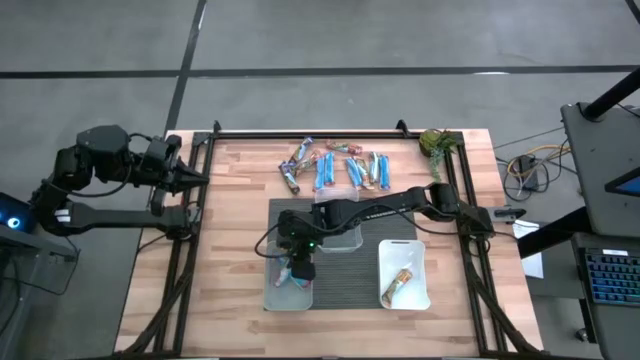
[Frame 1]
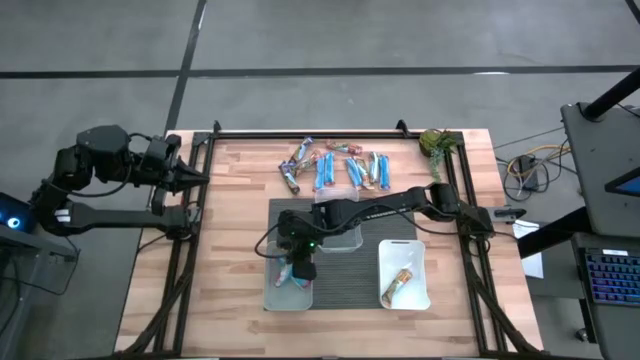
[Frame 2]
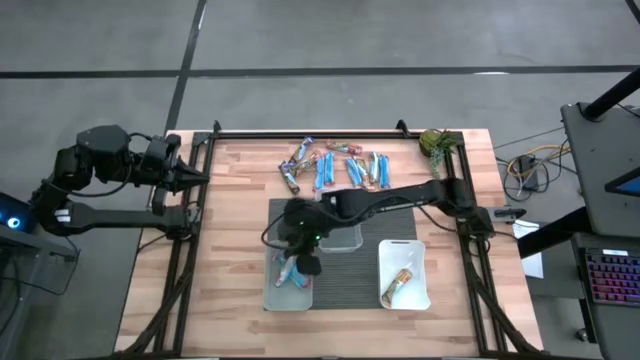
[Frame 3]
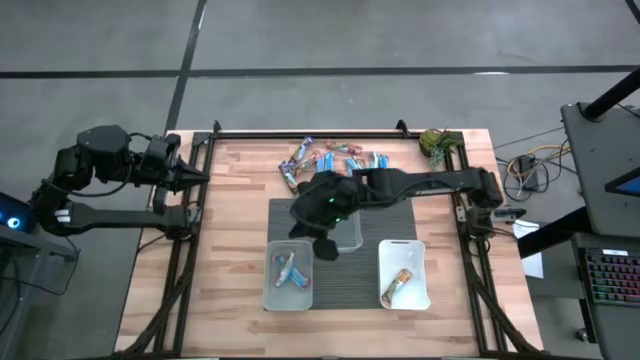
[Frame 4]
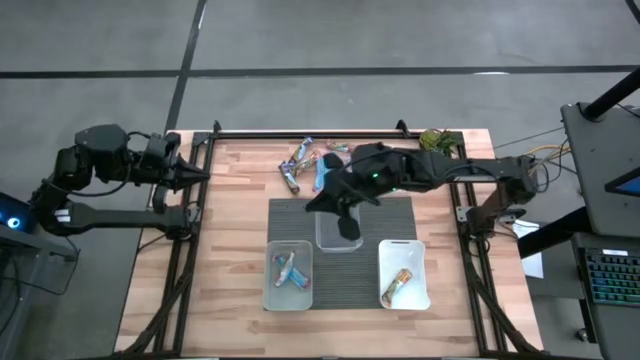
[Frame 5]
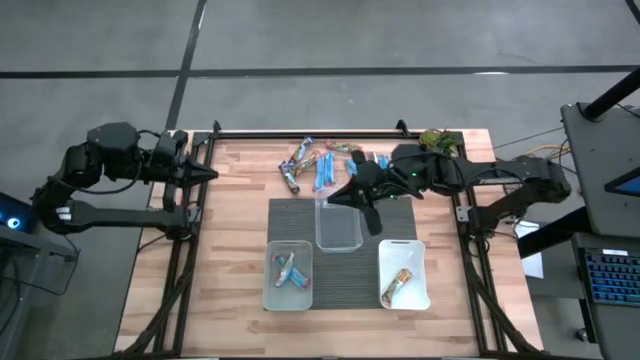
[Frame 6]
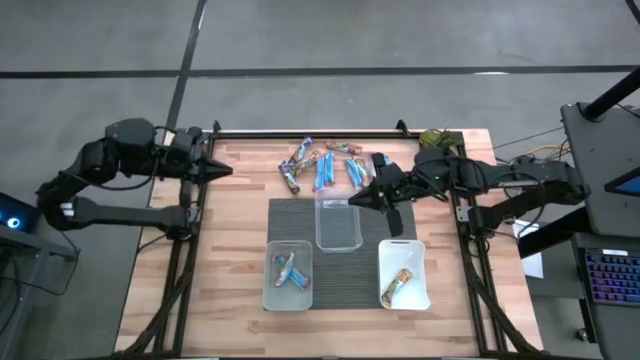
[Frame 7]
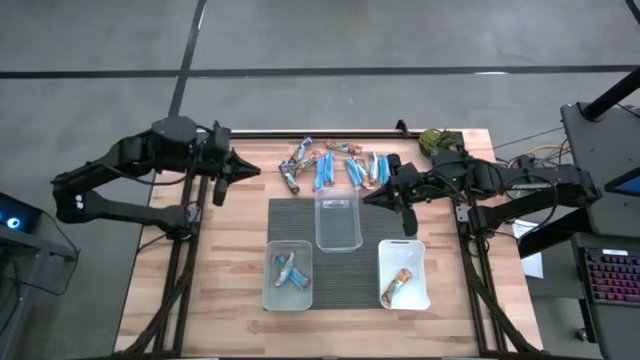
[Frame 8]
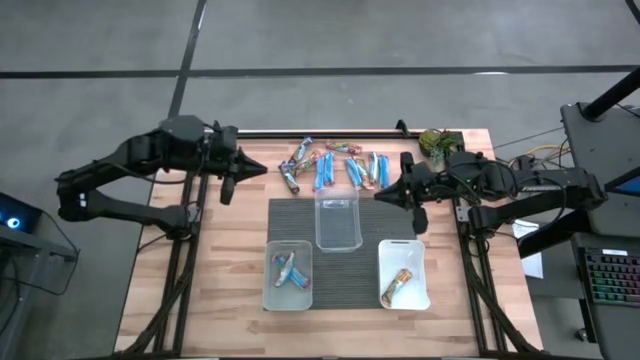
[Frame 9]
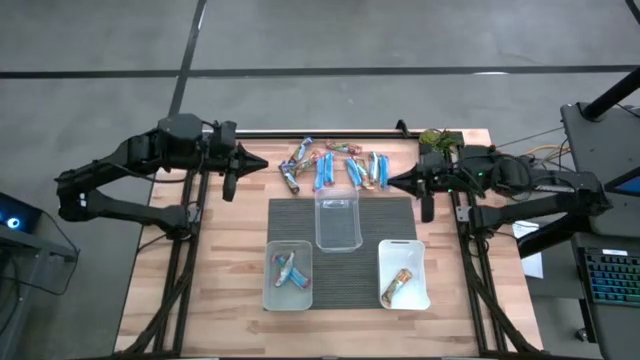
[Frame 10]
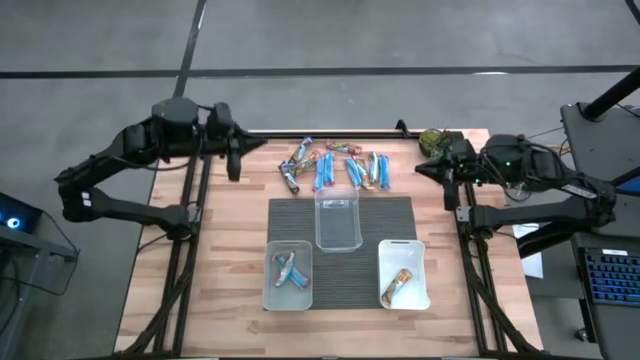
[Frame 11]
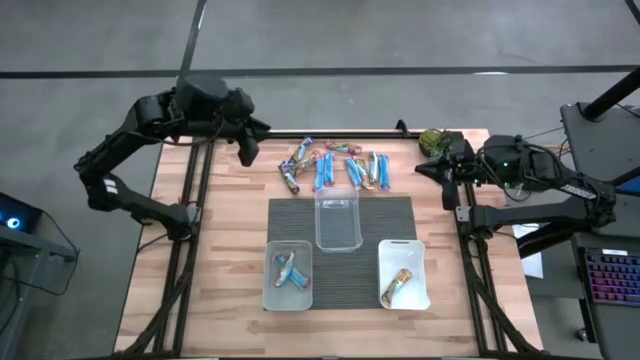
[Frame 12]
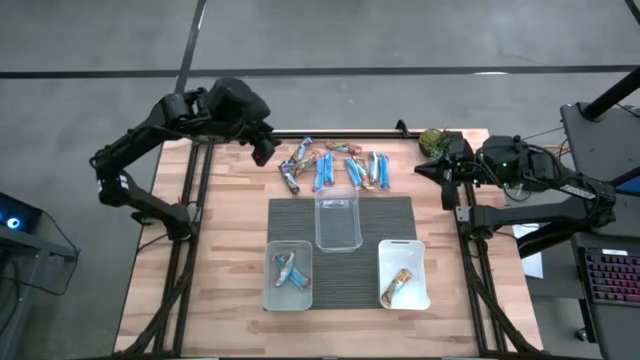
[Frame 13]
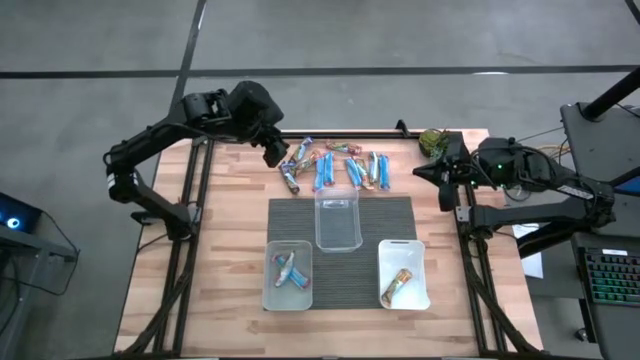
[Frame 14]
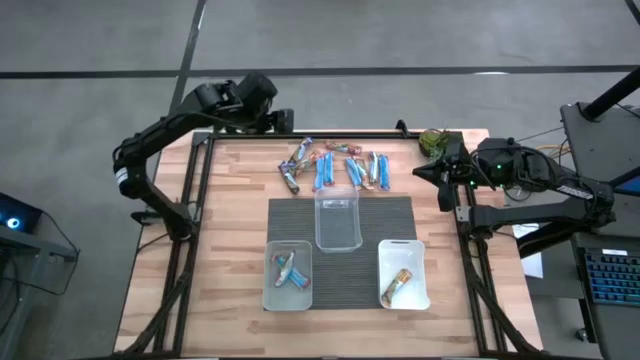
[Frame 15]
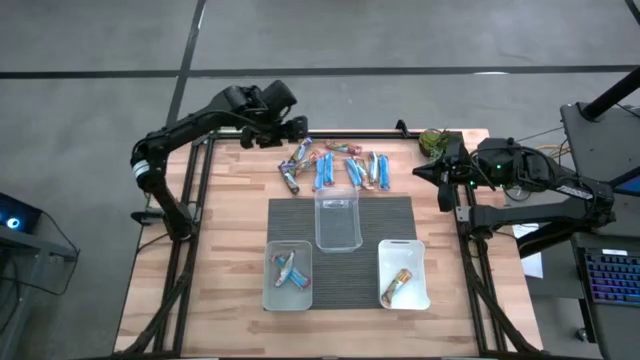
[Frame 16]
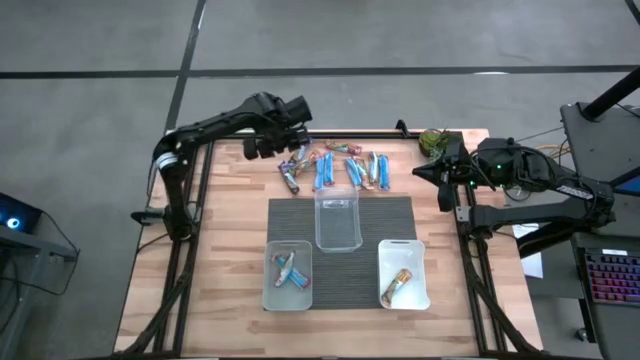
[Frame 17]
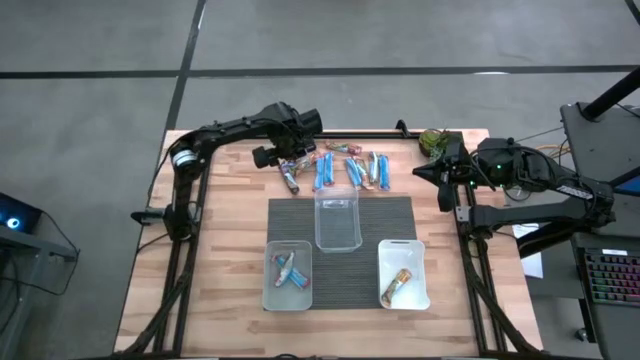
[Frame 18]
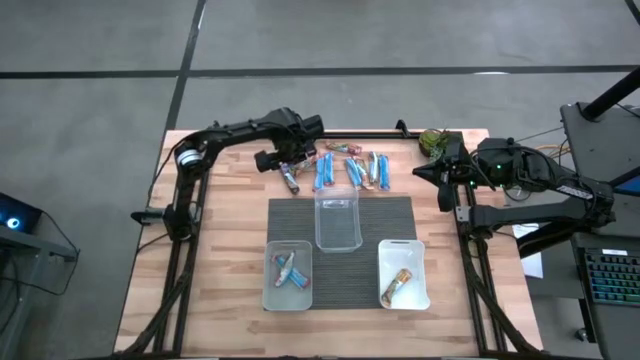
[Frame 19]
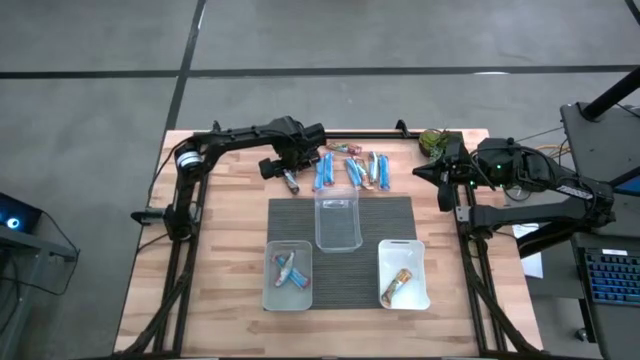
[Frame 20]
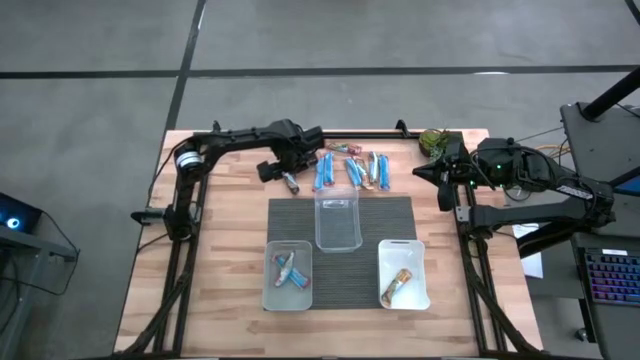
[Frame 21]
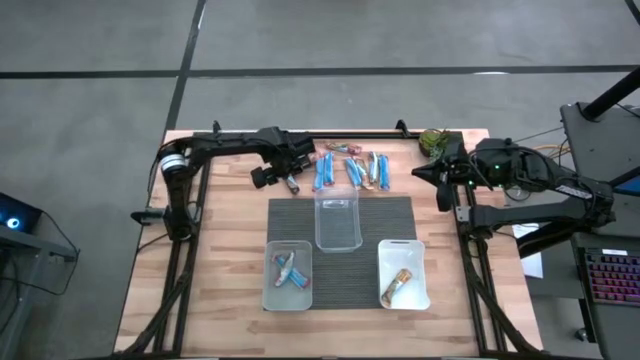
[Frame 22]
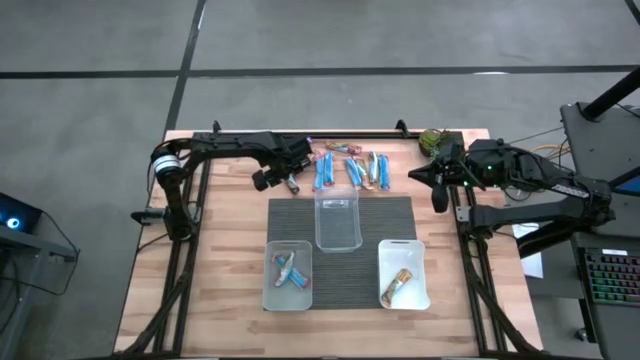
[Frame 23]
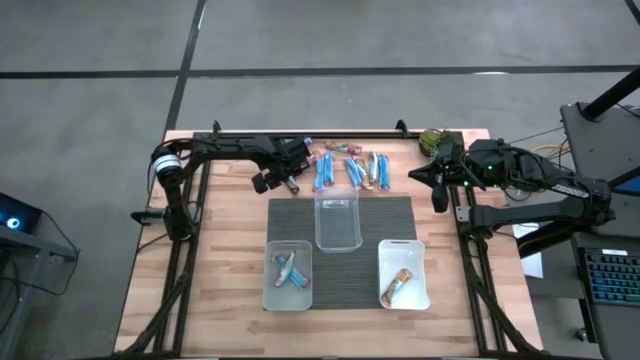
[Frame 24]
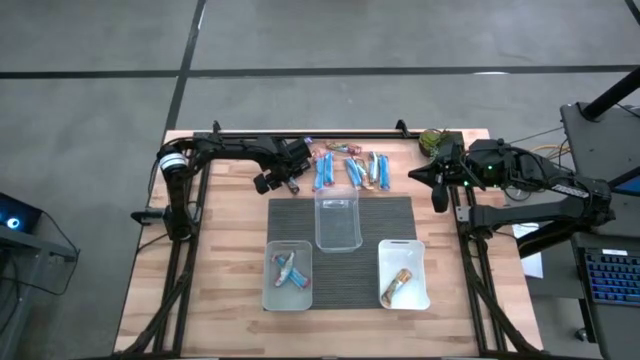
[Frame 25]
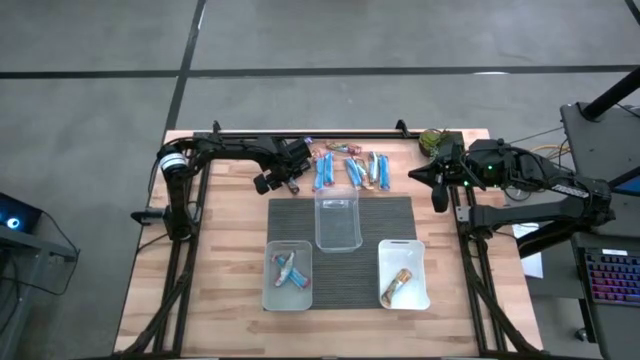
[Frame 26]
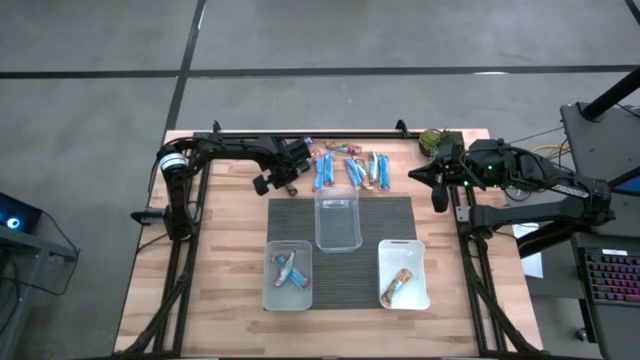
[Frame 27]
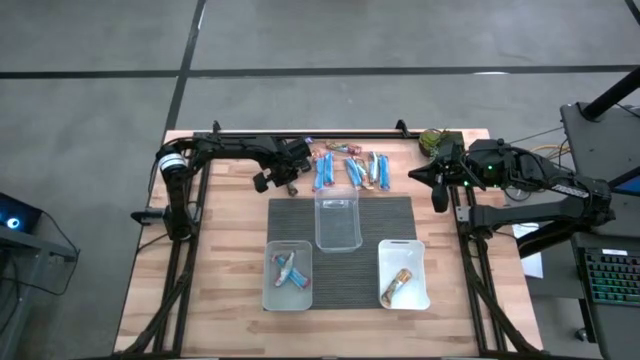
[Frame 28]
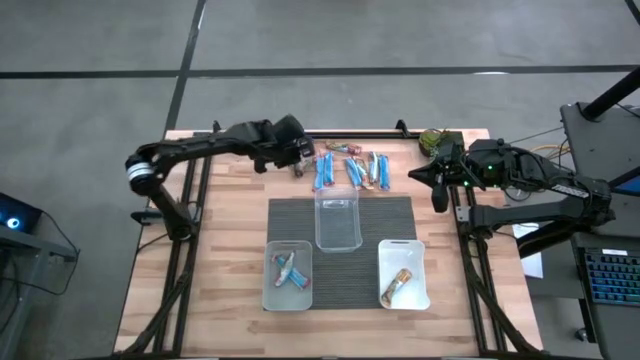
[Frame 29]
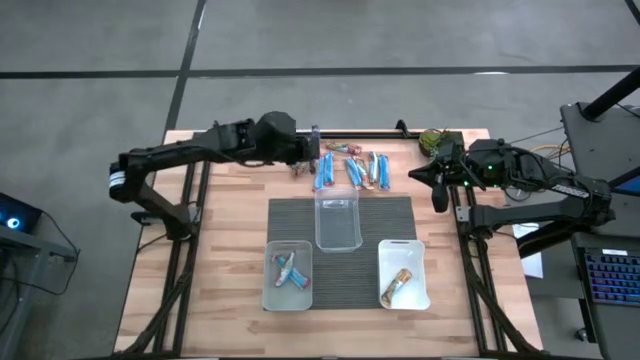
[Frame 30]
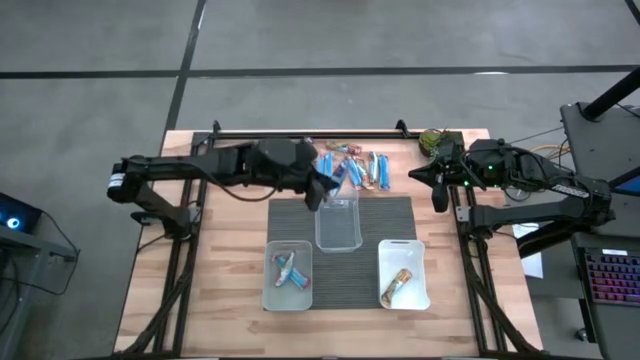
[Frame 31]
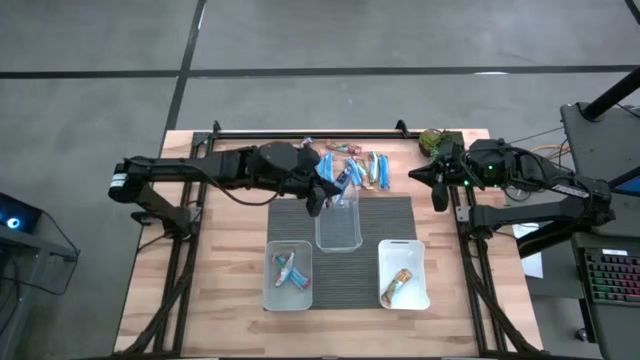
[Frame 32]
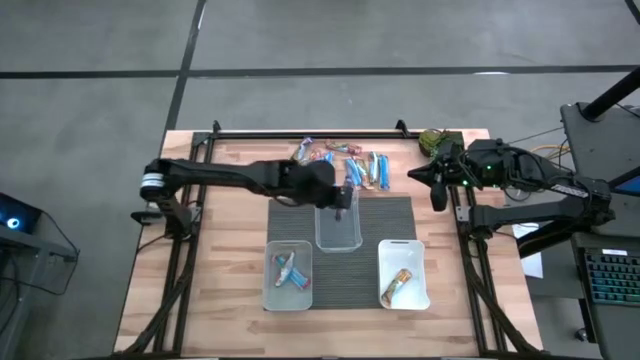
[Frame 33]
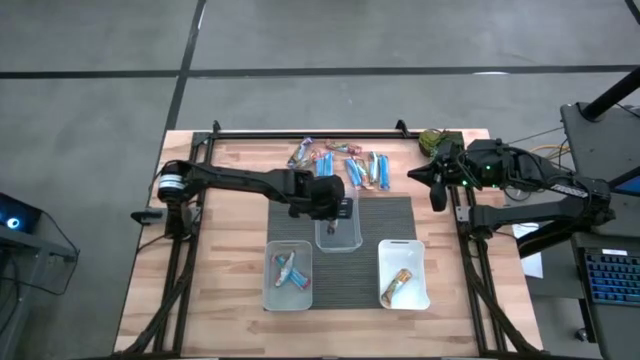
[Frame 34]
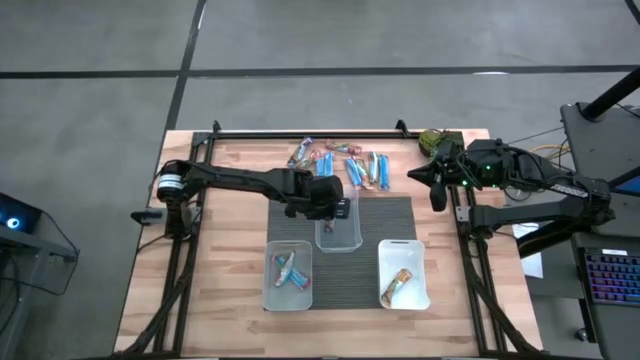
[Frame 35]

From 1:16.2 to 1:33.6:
Task: Pick and place Granola Bars by type
Put the blue granola bar into the transparent bin

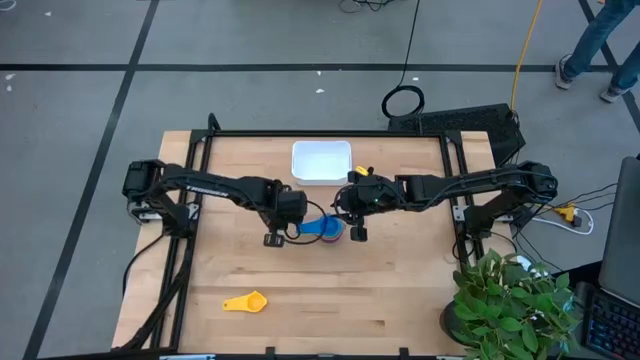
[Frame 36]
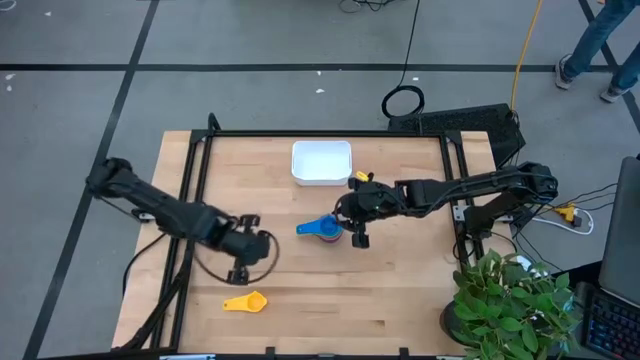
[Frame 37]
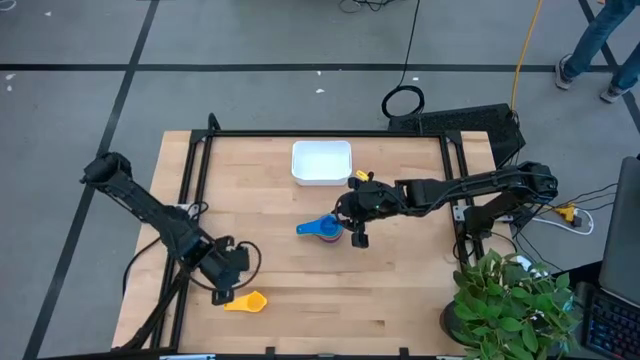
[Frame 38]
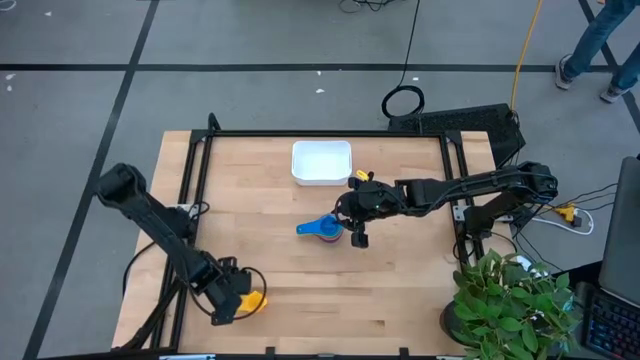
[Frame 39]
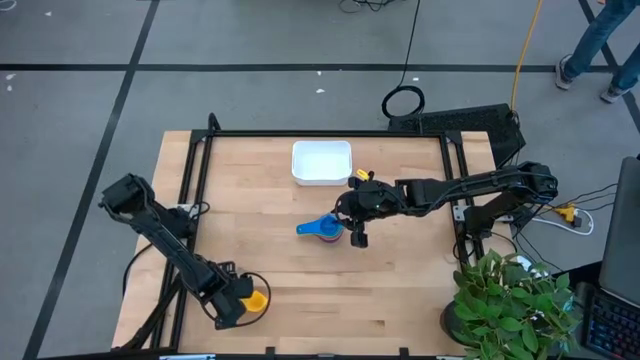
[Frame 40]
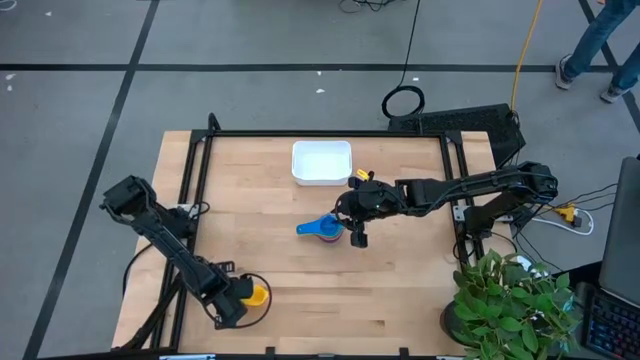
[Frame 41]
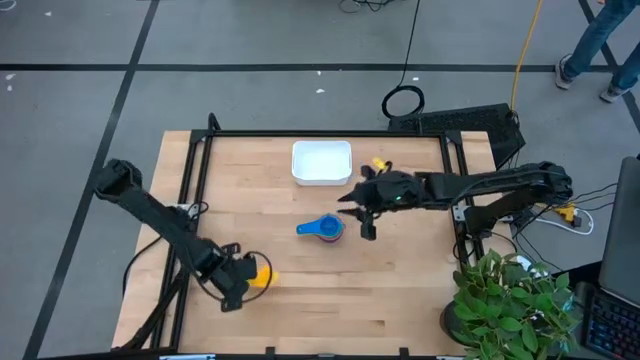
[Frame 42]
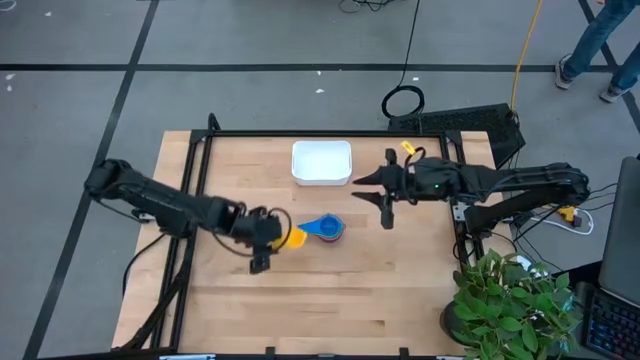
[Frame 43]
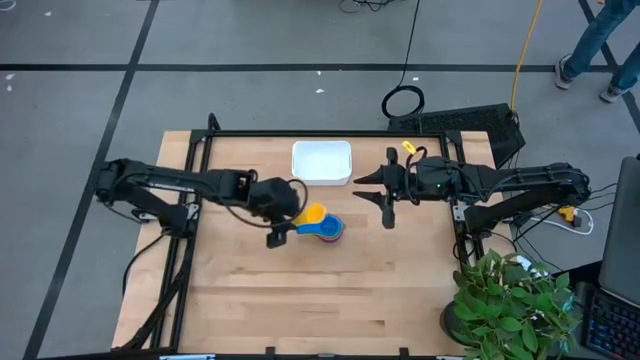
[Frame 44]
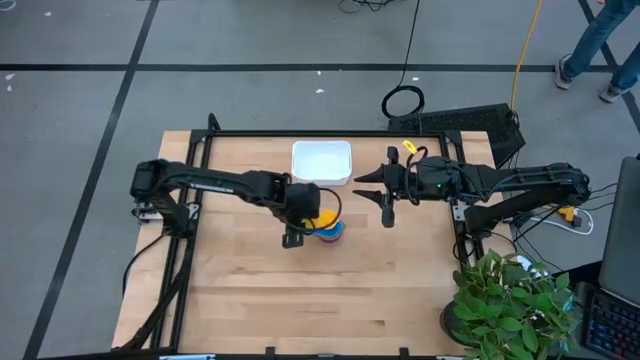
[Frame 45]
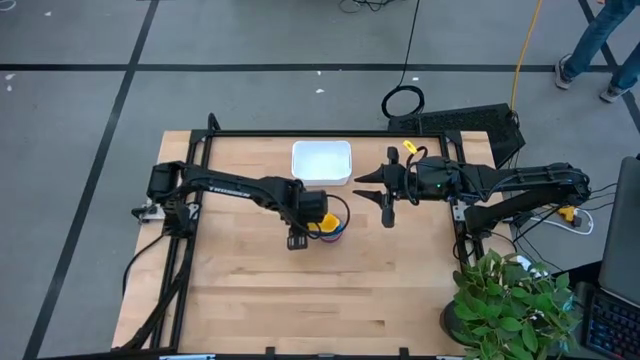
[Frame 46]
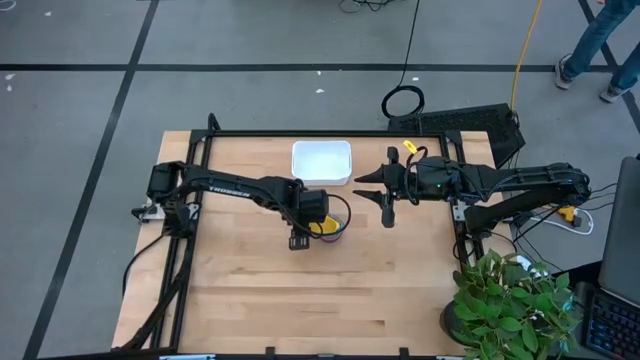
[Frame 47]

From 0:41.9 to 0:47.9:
Task: Nest measuring cups in basket
Stack the yellow measuring cup on the blue measuring cup
